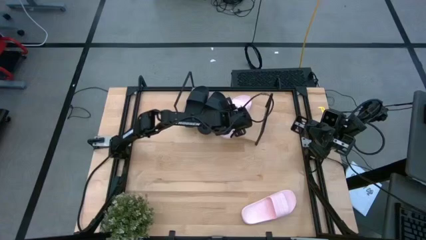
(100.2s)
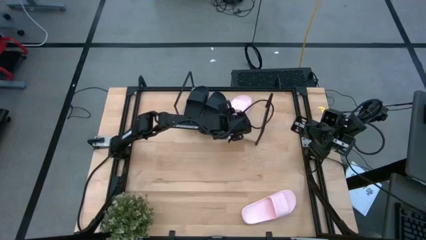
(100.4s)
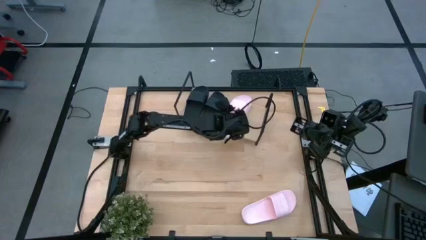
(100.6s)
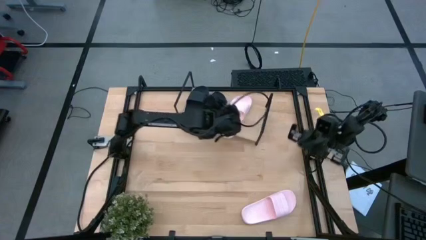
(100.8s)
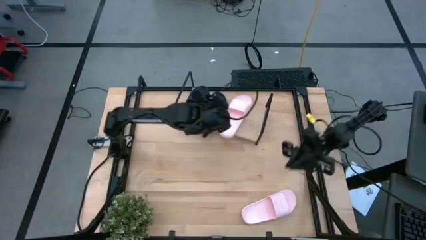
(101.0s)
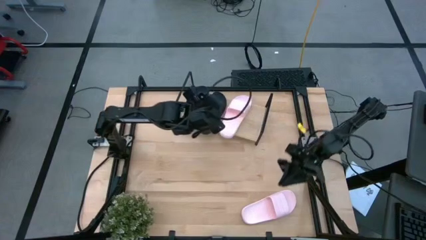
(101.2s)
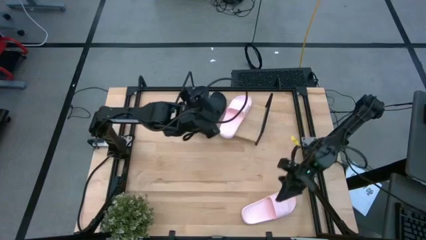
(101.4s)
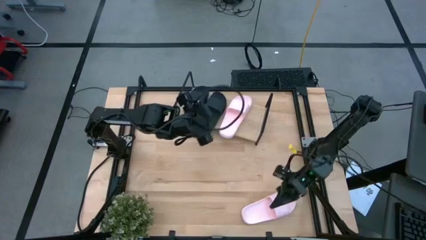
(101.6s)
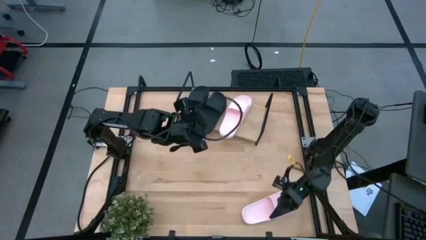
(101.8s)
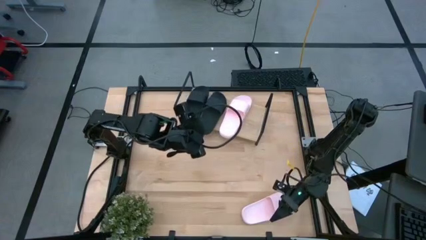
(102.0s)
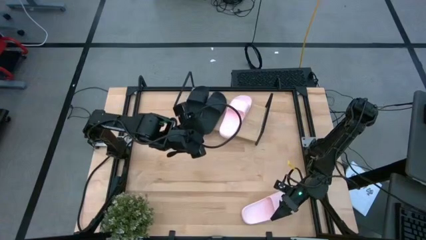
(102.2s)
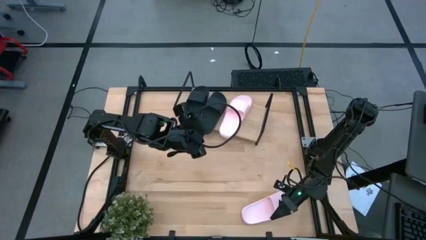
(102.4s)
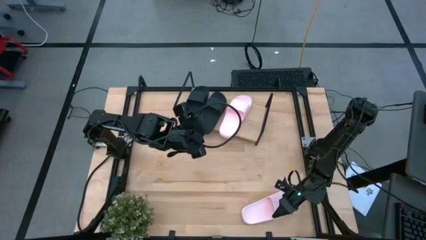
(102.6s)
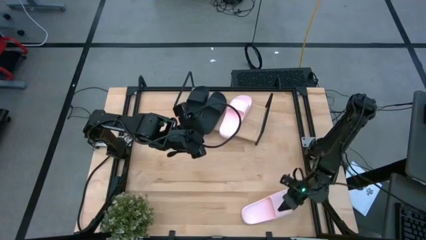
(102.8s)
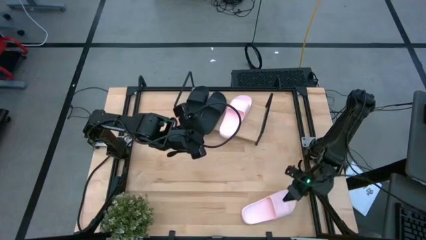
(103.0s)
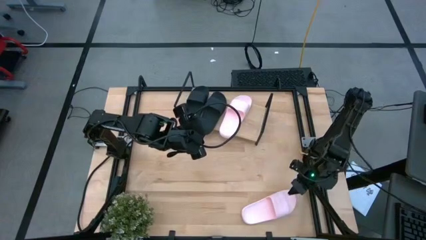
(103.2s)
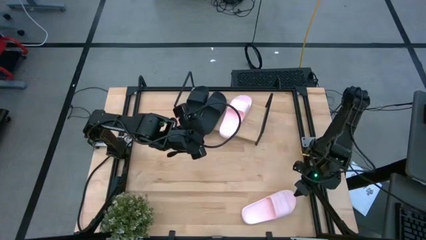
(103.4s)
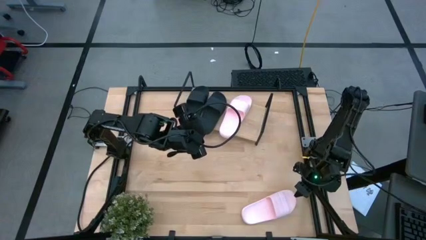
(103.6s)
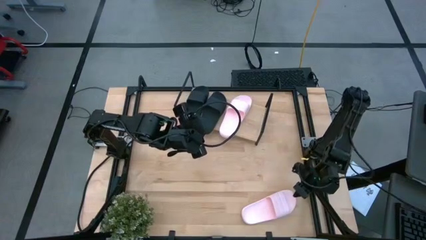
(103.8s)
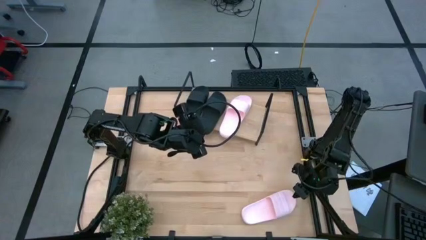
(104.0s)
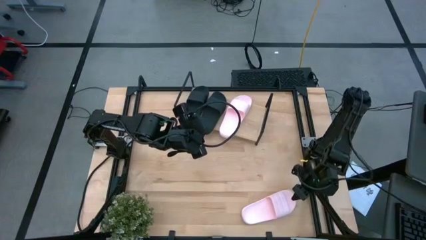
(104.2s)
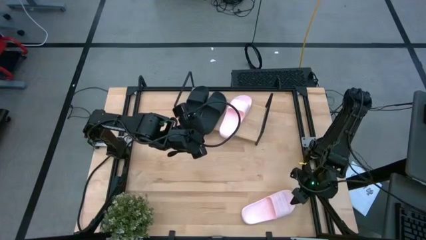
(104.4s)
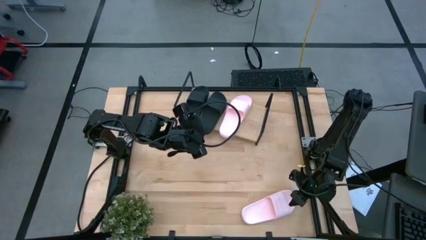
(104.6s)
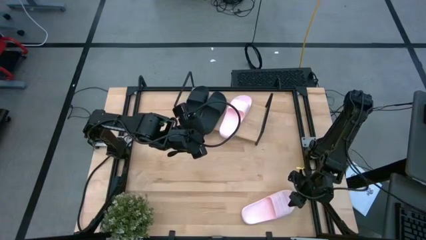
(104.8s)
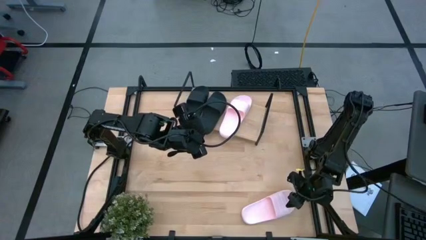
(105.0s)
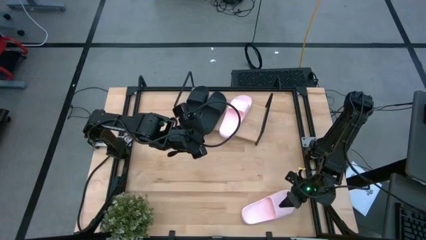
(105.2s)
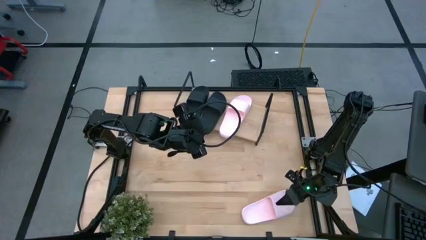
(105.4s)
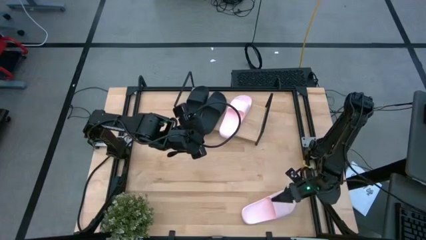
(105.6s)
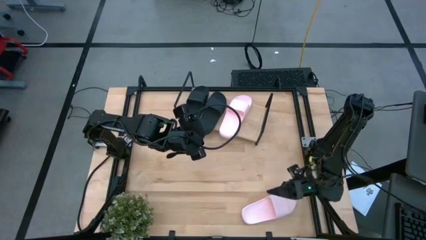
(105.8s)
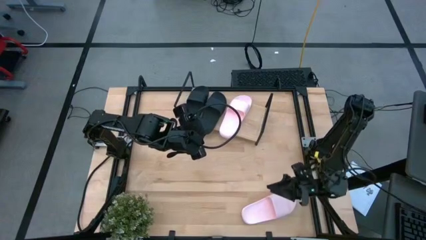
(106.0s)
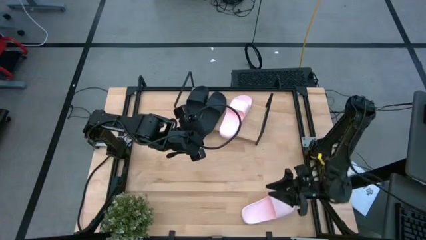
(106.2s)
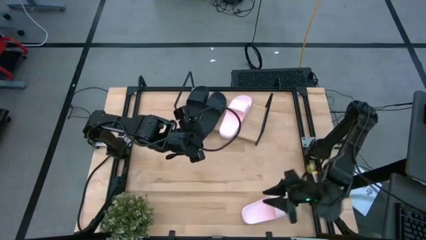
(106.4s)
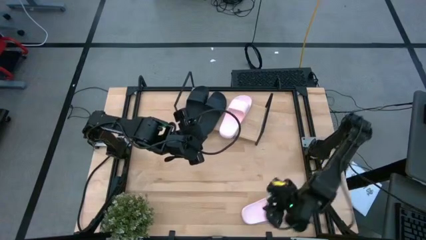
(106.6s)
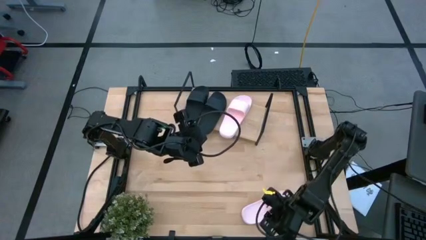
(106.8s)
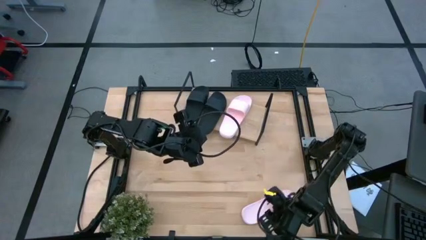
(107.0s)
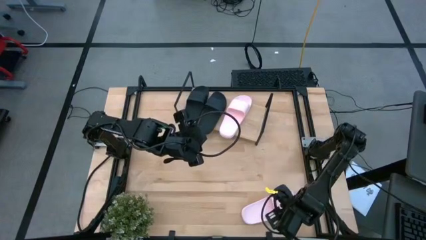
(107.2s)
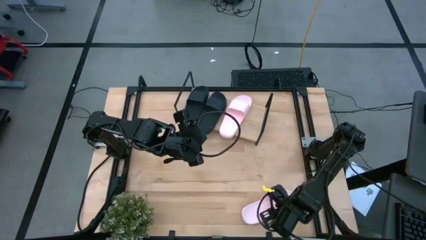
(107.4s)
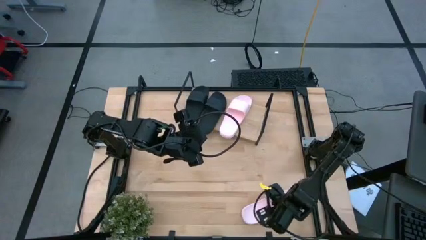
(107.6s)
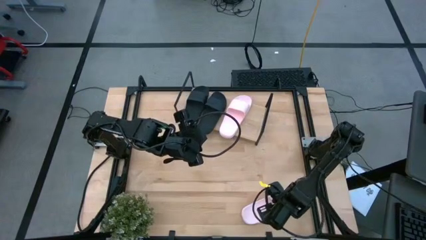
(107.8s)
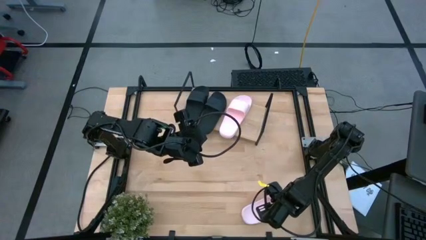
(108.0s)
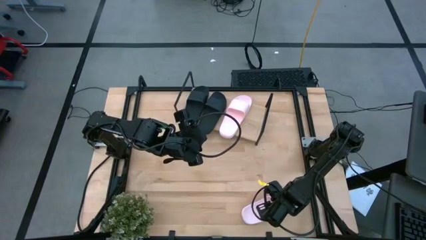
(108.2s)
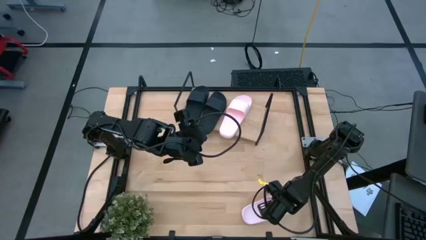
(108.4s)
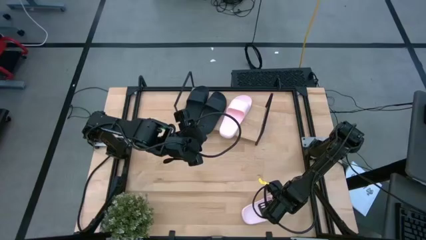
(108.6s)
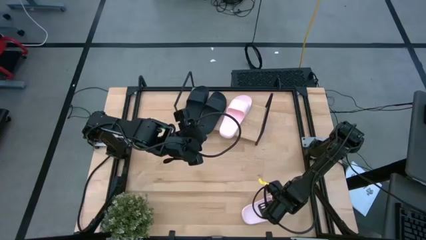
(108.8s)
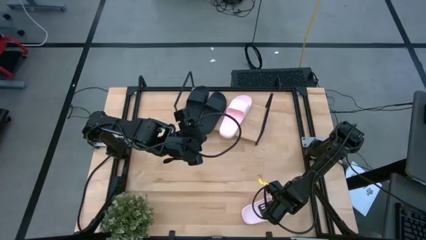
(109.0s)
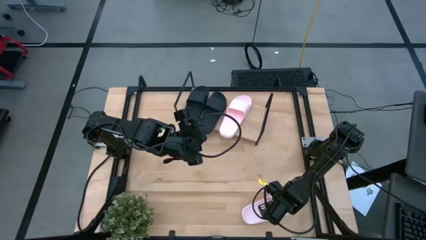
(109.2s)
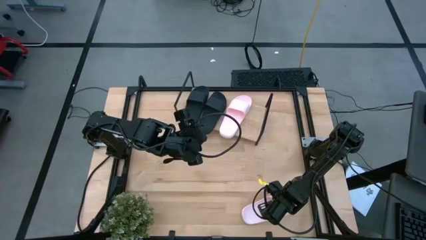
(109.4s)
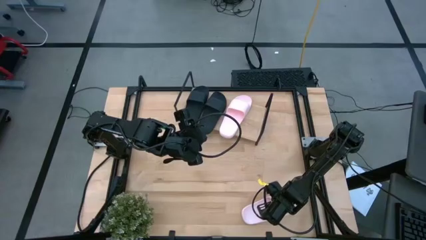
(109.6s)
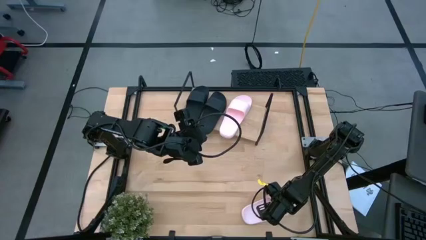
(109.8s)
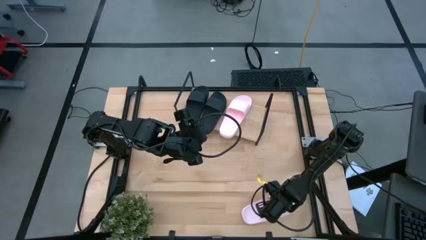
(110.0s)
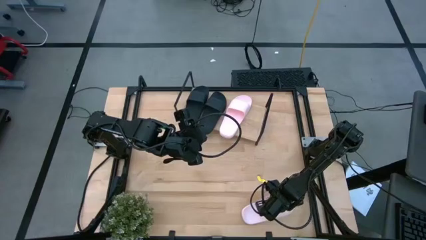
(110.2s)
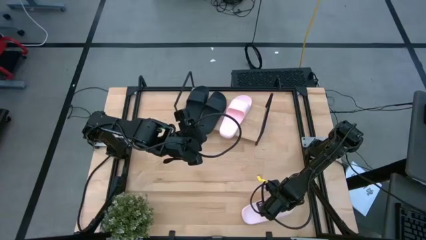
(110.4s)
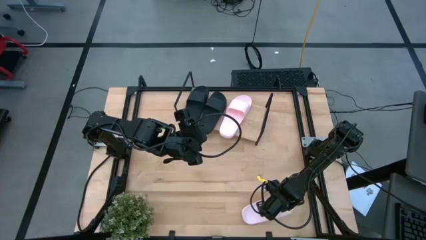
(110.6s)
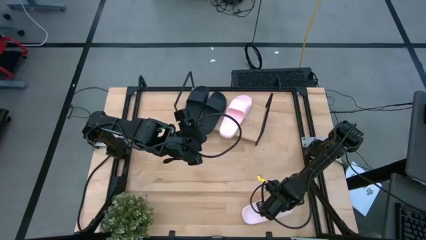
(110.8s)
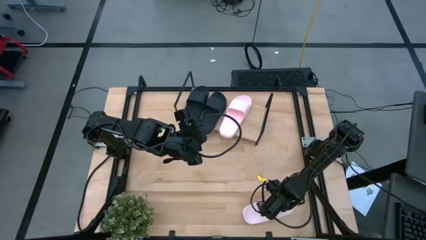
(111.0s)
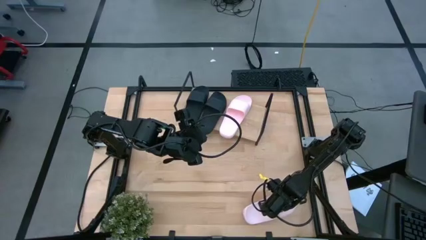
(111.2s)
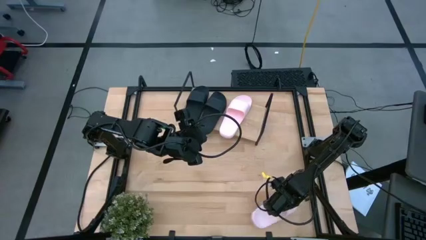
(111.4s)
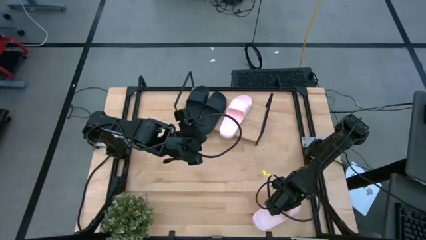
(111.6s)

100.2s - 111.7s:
Task: Pick and place slides into the shelf
Put the pink slipper on the shelf

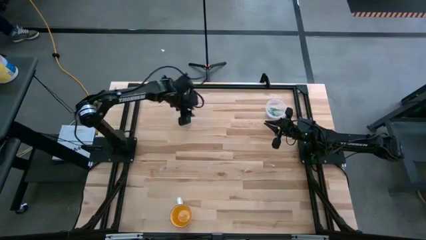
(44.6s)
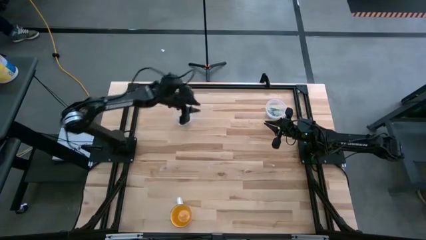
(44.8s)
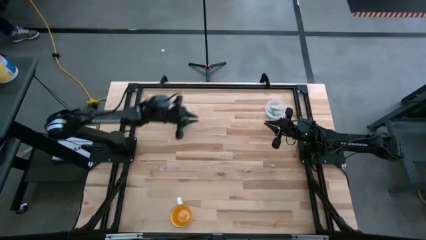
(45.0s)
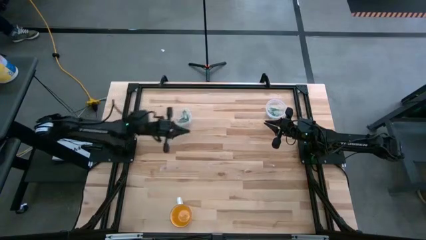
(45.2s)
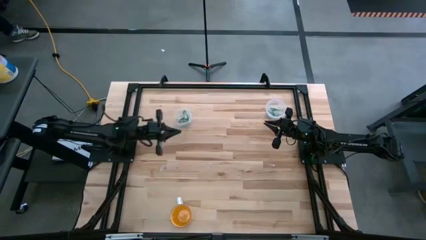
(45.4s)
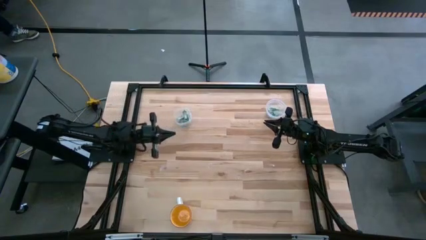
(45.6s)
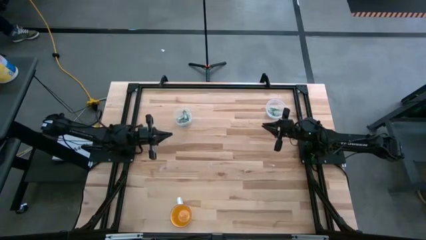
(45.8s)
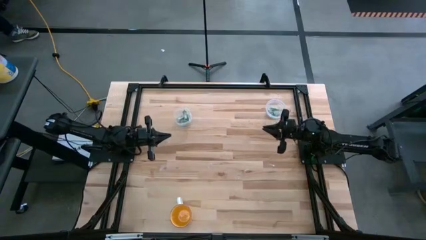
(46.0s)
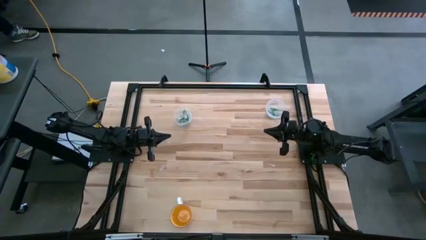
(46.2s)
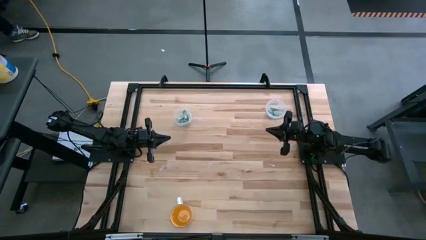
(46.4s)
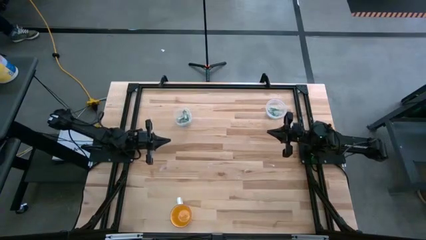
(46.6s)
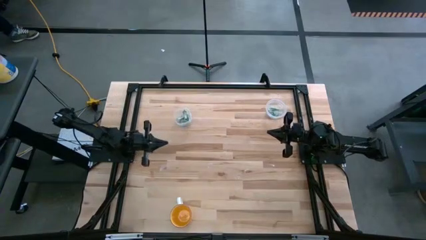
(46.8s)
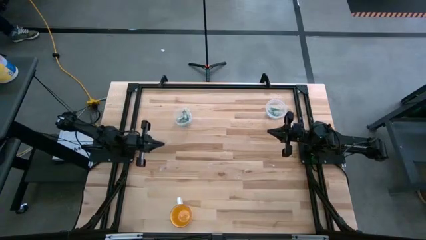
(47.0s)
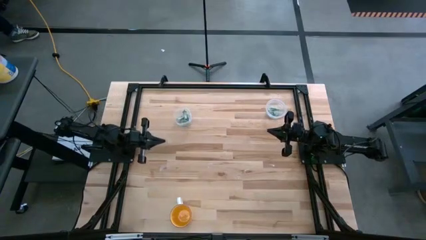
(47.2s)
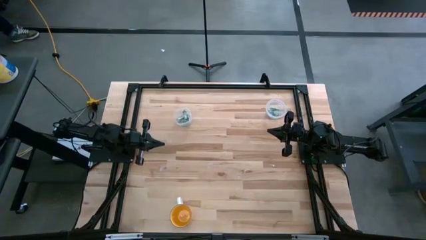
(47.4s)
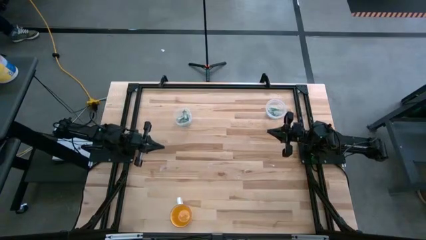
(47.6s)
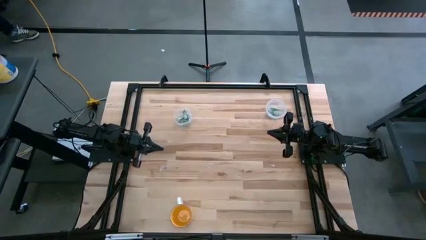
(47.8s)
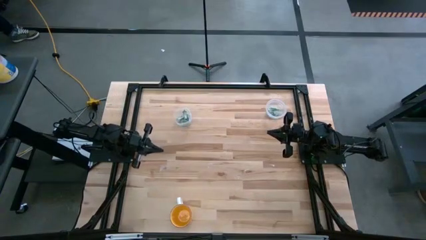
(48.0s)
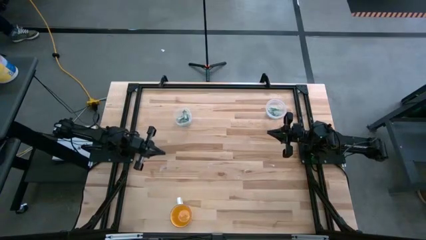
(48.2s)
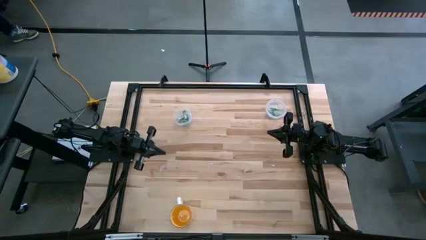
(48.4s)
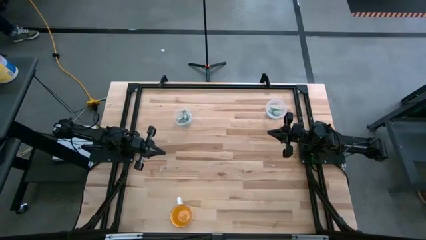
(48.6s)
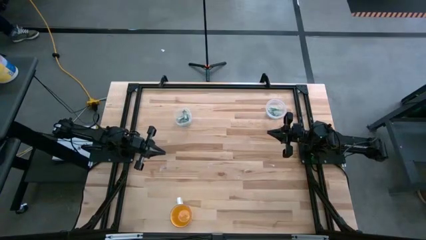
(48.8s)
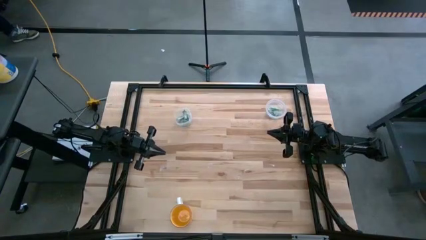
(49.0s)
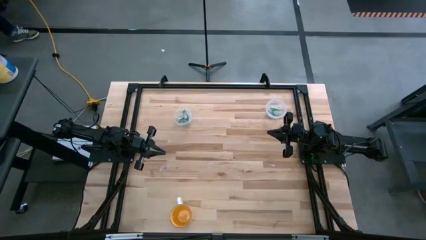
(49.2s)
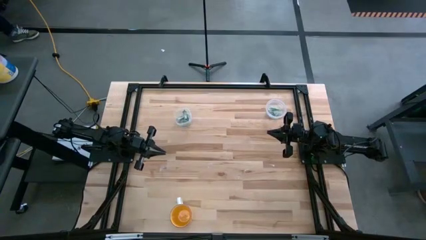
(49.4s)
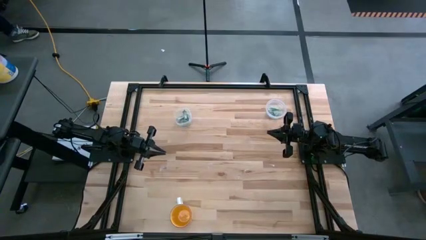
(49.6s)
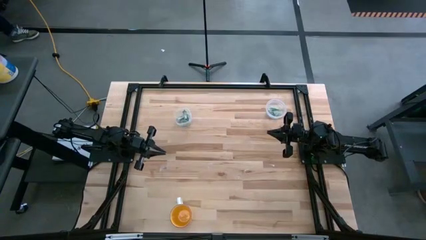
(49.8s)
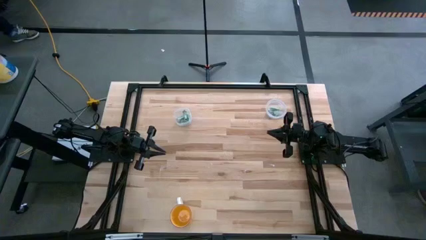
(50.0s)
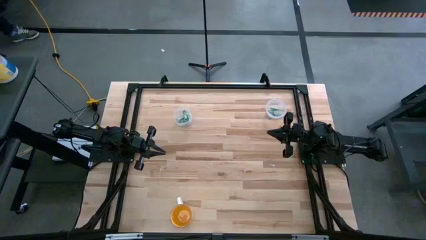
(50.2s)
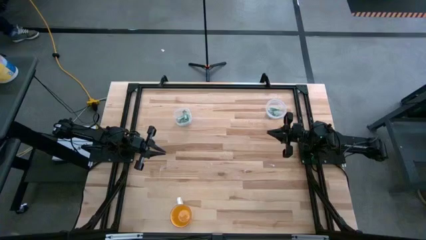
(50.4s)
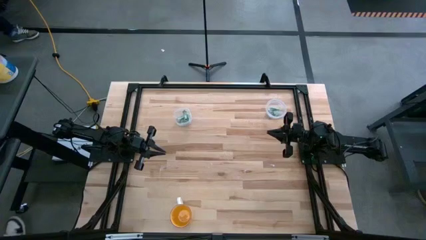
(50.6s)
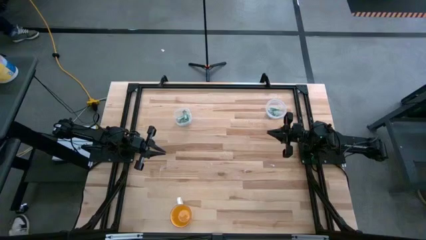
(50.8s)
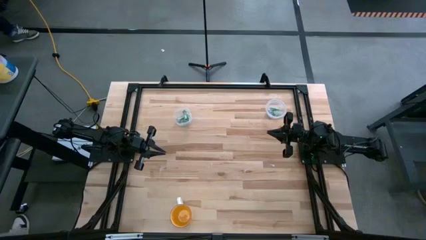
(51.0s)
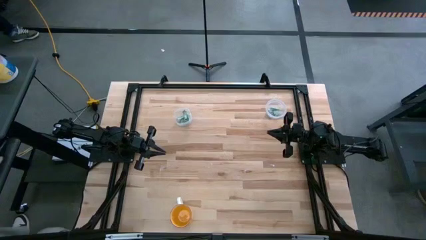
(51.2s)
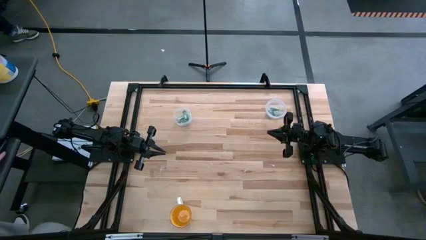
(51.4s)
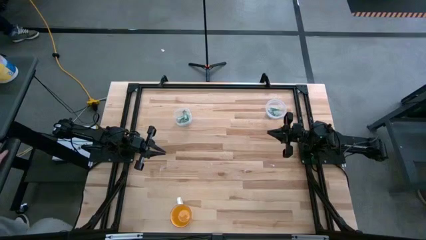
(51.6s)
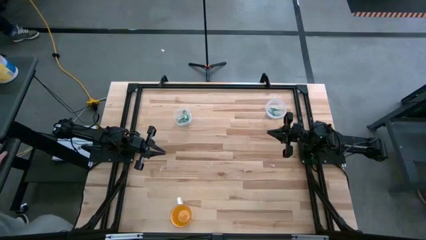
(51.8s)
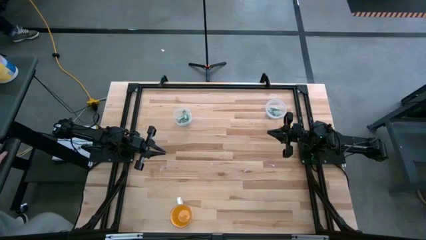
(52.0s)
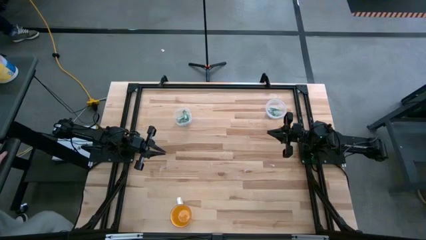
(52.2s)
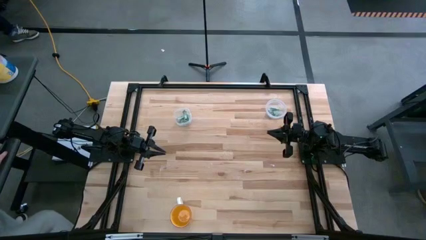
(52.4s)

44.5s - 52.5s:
Task: Pick and place items into bin
Return to Home Position
